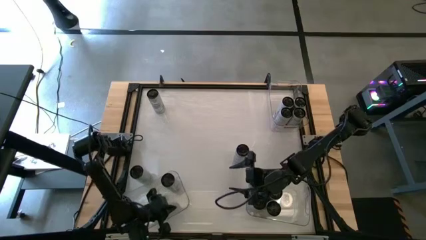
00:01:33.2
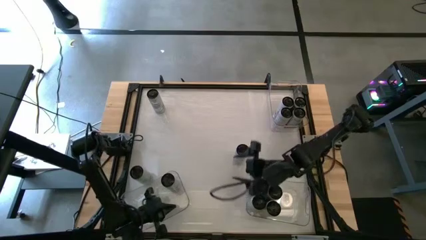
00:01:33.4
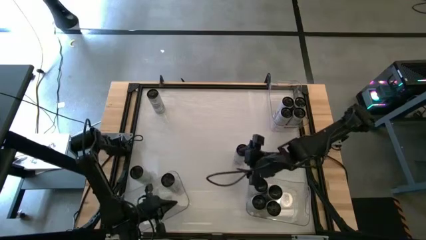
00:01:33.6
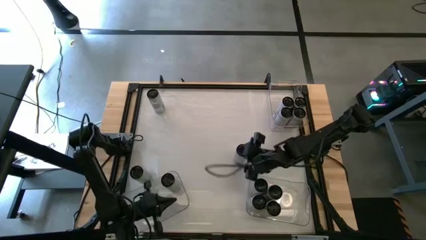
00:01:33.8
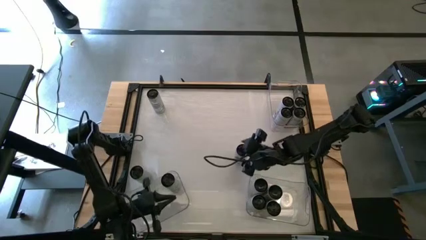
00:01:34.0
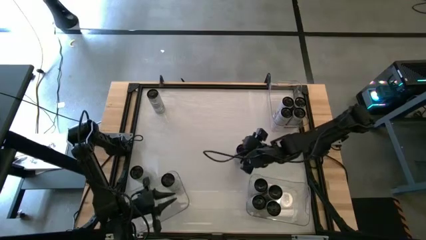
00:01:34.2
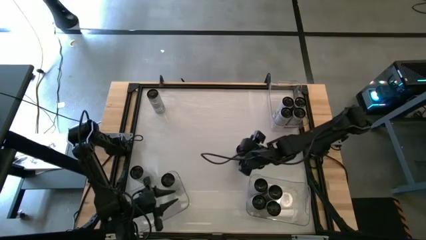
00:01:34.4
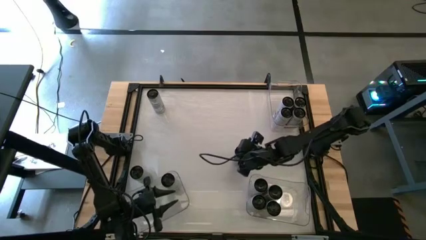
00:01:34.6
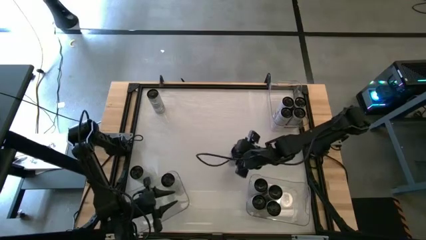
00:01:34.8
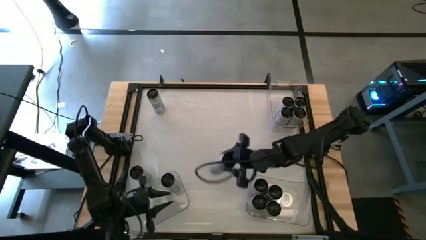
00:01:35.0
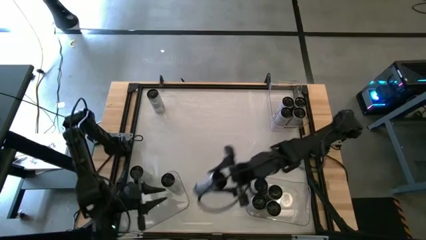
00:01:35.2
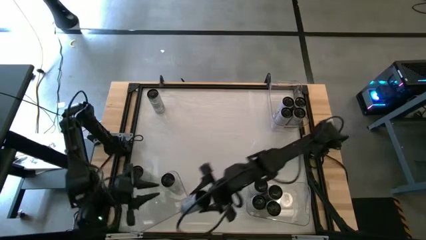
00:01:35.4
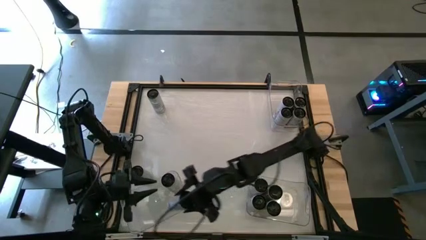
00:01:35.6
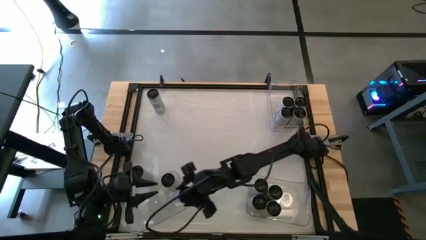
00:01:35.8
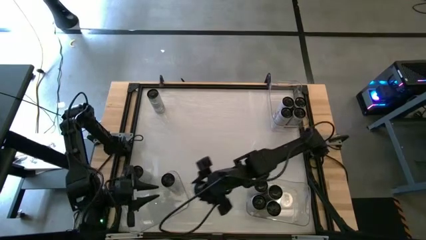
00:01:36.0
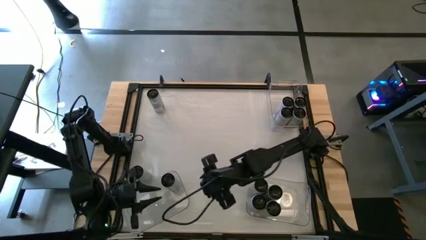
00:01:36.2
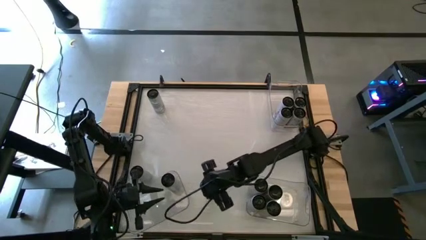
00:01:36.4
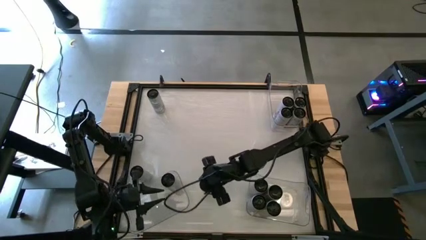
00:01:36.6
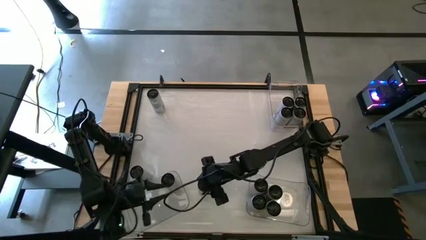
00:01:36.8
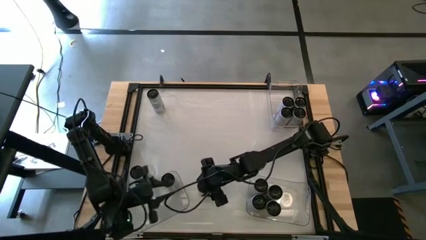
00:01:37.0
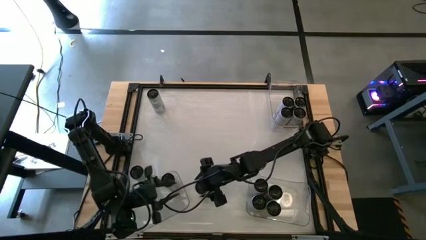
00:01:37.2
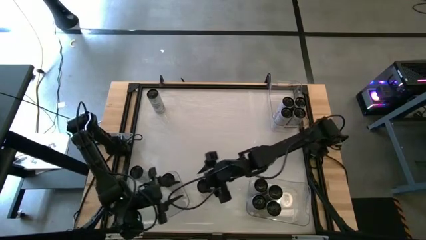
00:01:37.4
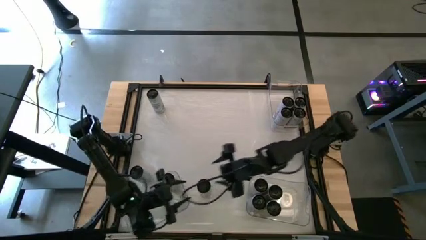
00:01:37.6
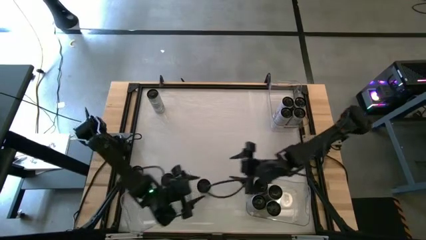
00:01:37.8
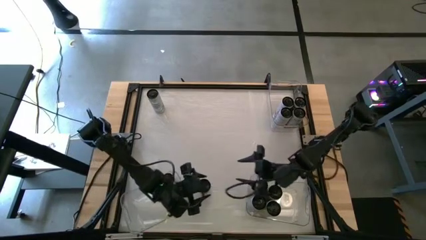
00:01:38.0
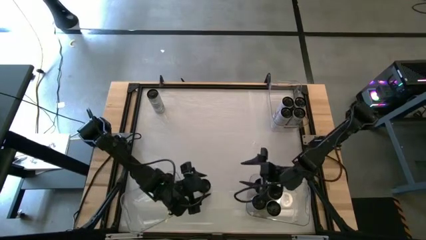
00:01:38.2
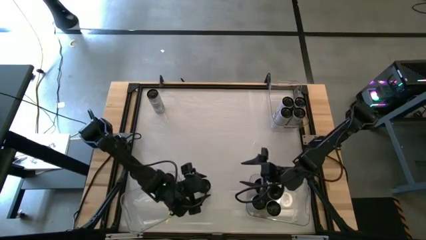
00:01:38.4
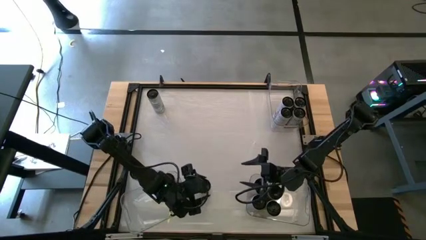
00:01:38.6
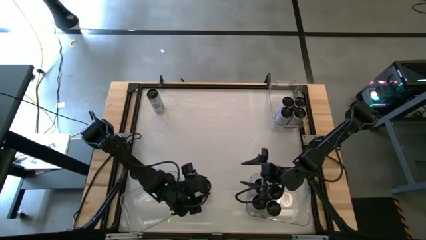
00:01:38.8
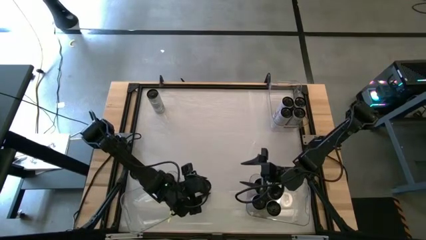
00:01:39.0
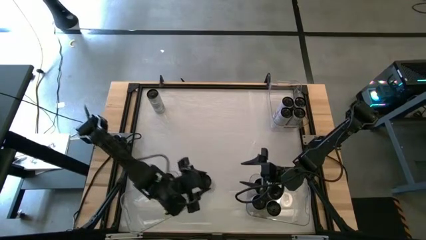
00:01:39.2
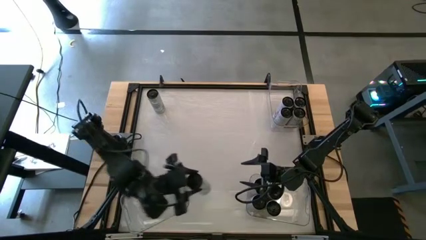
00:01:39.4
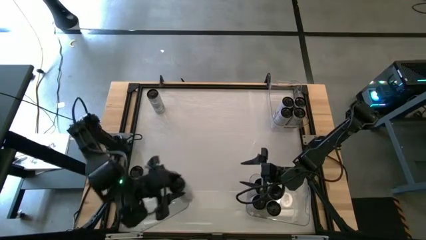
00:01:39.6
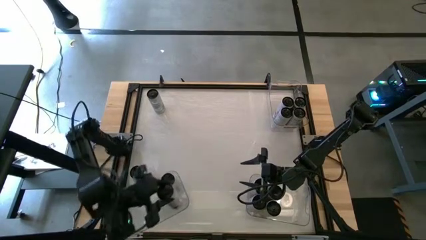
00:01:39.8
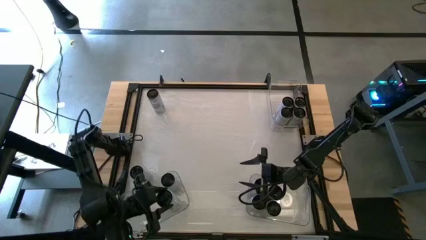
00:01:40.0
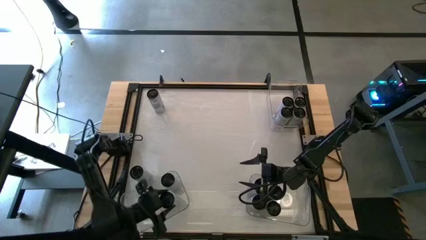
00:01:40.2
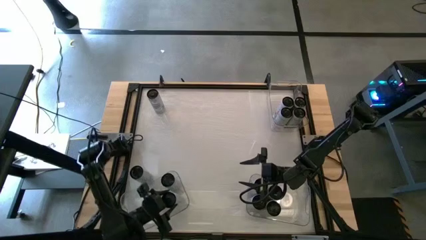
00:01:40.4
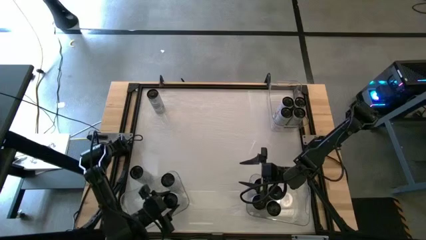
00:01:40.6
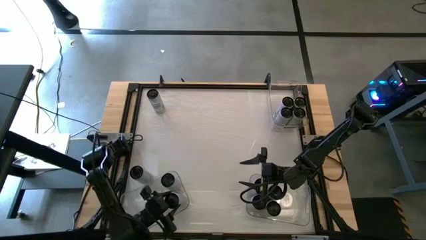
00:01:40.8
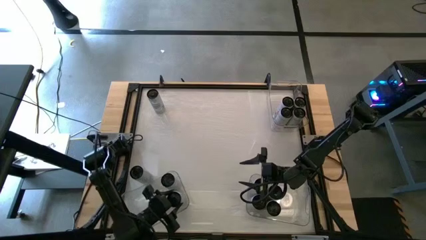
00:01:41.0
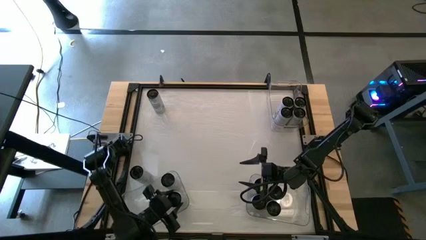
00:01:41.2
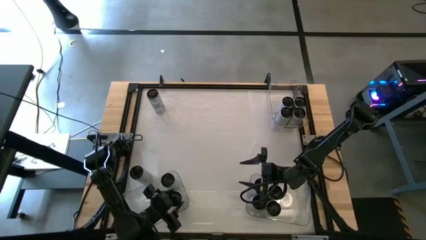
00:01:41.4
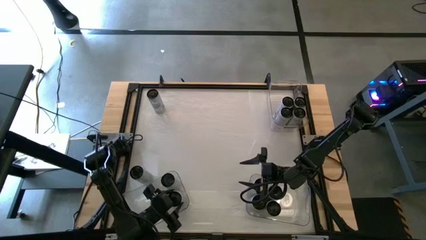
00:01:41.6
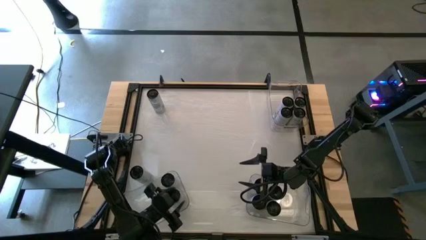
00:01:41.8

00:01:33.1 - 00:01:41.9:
Task: Sort soda cans
Put the bottom right white-blue soda can into the bottom left transparent bin

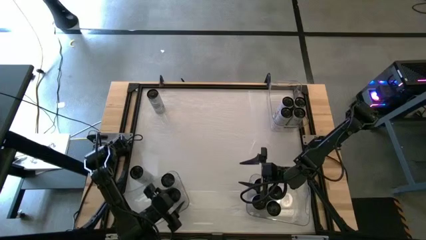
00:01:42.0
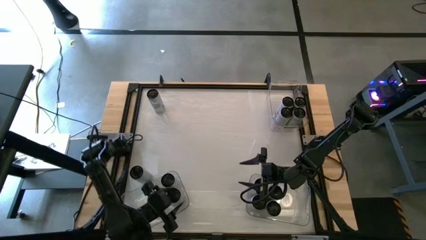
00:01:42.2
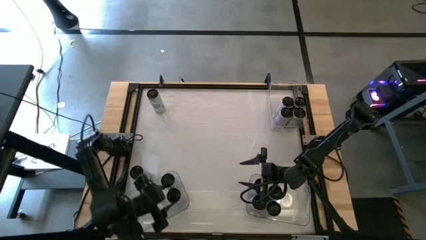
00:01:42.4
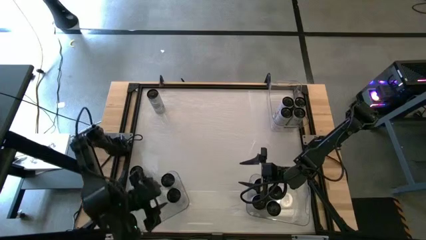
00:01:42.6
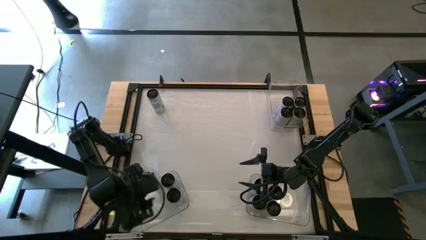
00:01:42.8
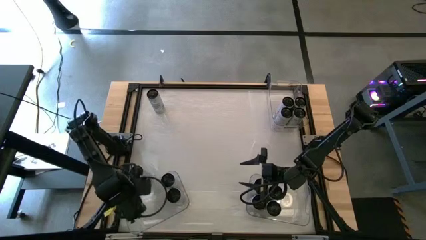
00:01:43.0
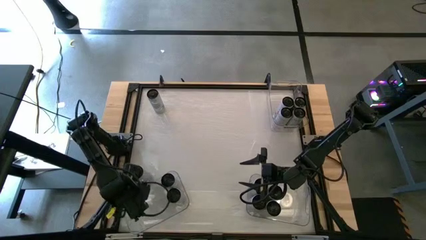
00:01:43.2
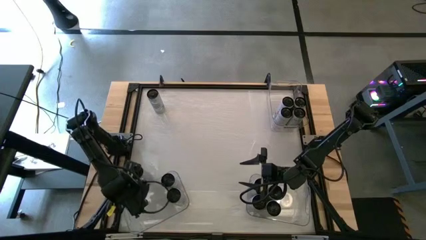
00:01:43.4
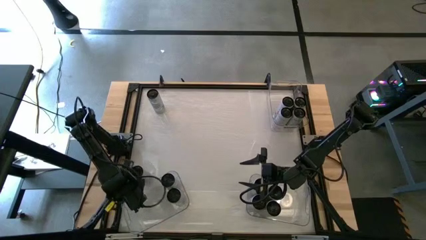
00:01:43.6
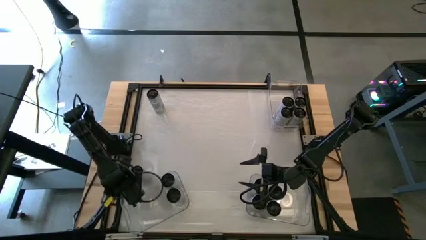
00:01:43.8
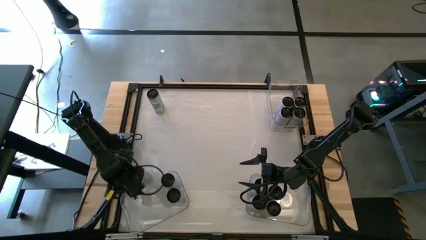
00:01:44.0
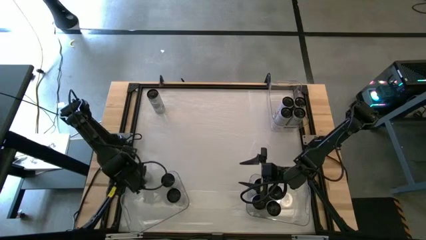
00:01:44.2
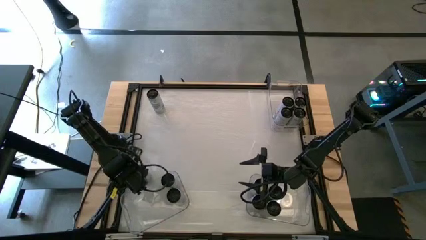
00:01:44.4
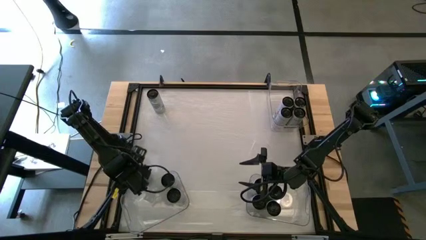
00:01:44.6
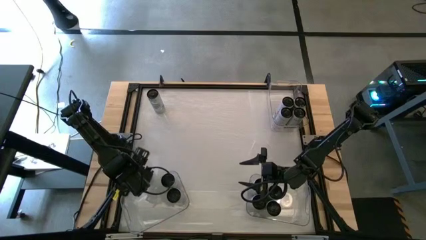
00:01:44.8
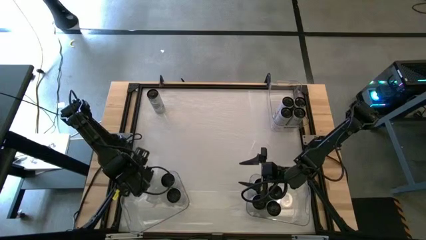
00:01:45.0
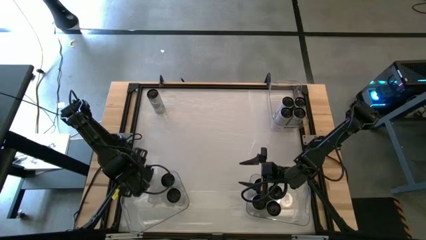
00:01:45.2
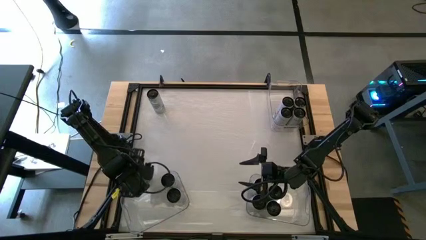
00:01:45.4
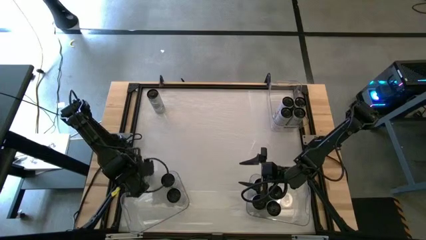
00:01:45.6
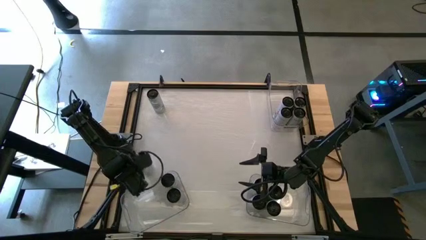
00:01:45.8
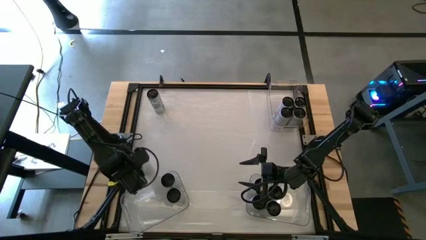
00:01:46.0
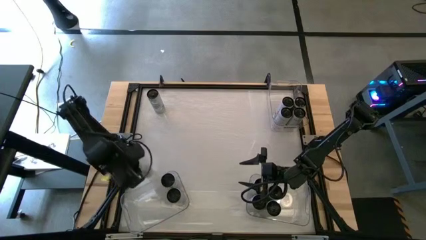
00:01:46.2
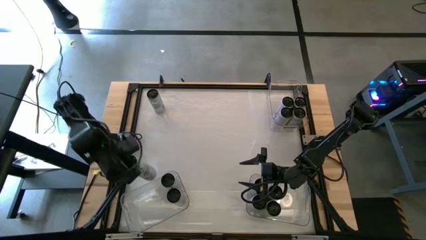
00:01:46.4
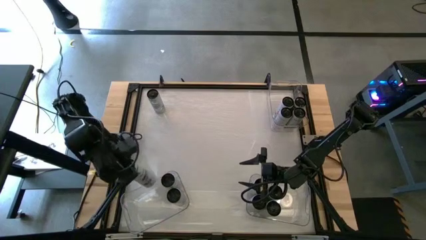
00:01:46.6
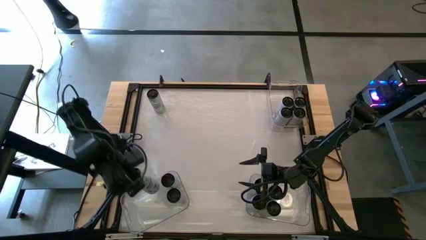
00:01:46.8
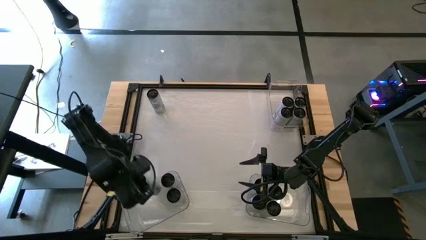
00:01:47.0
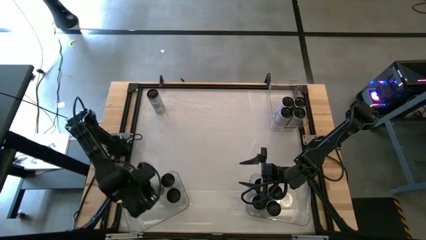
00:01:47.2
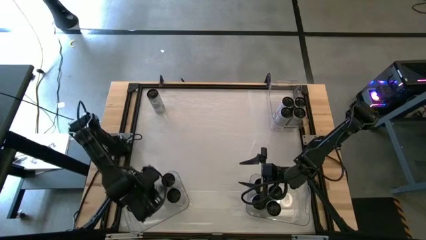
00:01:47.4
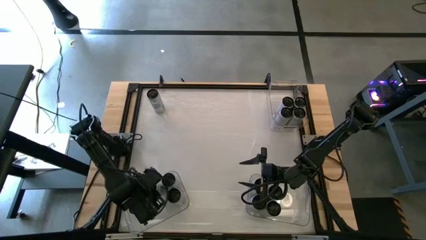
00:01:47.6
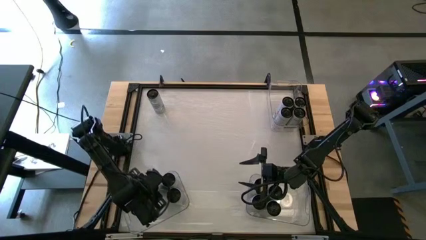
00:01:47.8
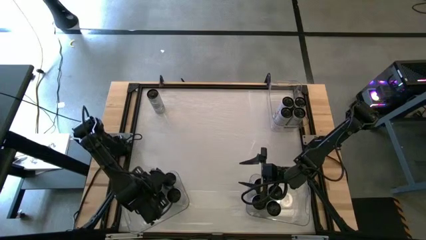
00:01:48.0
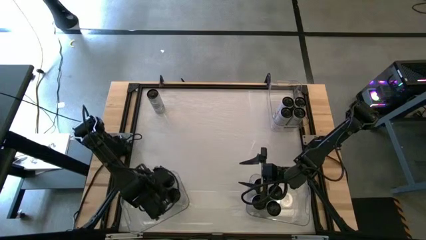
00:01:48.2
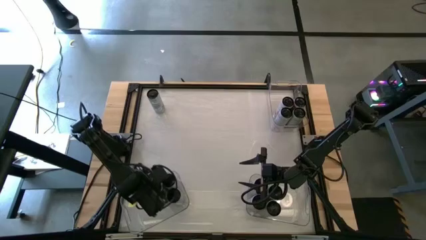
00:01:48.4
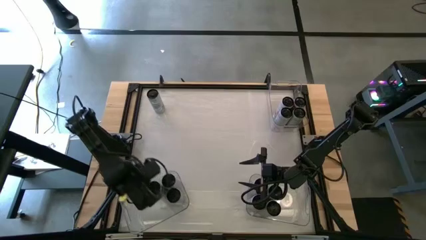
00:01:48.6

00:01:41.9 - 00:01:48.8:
Put the bottom white-blue soda can into the bottom right transparent bin
